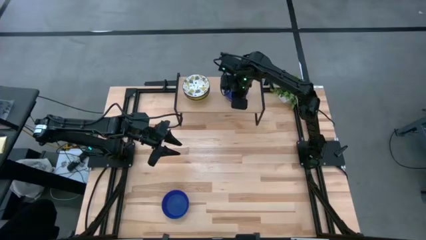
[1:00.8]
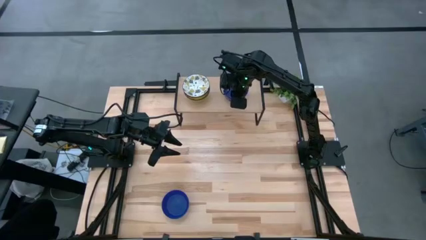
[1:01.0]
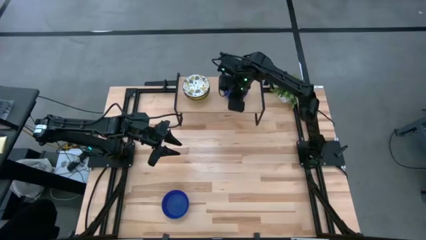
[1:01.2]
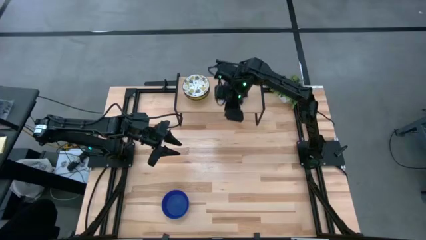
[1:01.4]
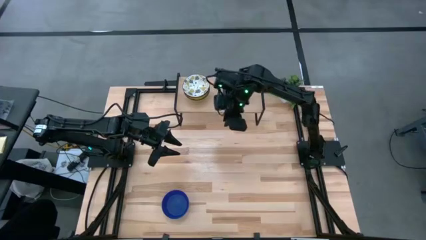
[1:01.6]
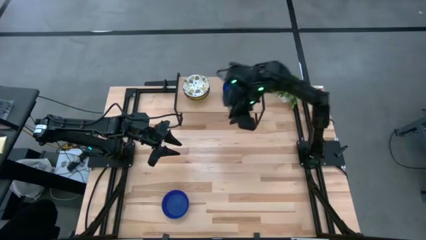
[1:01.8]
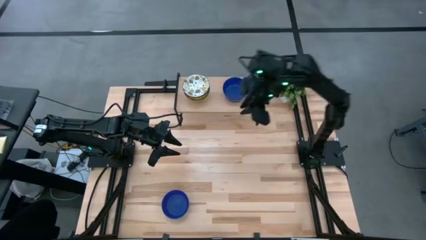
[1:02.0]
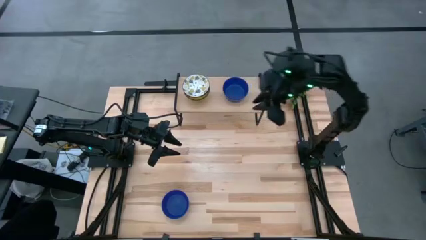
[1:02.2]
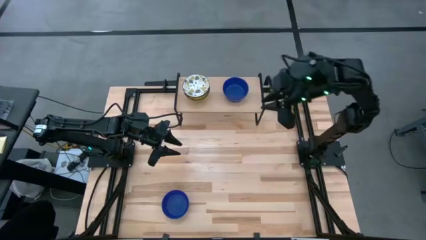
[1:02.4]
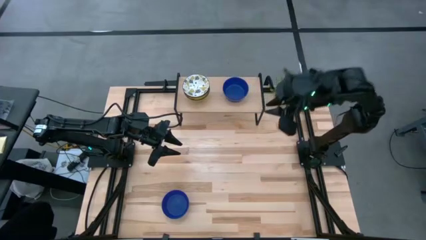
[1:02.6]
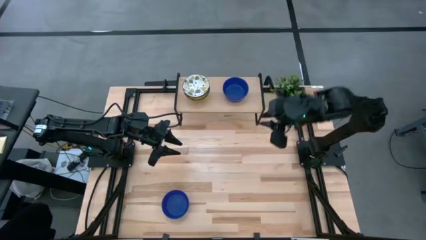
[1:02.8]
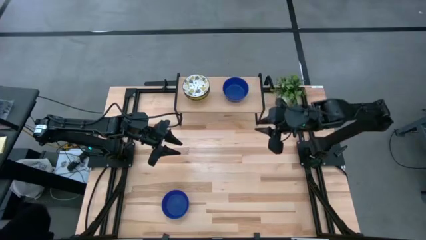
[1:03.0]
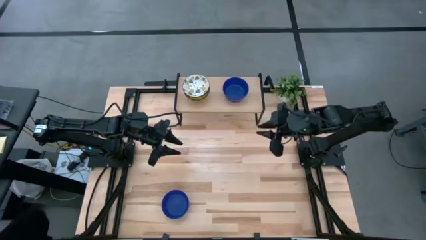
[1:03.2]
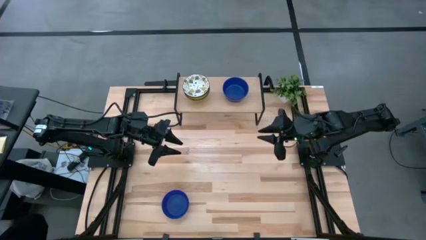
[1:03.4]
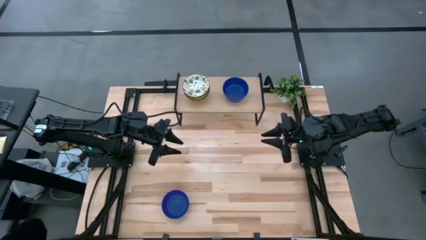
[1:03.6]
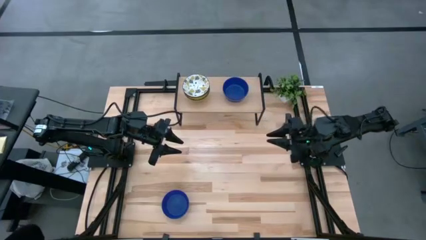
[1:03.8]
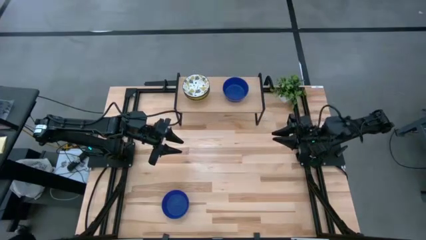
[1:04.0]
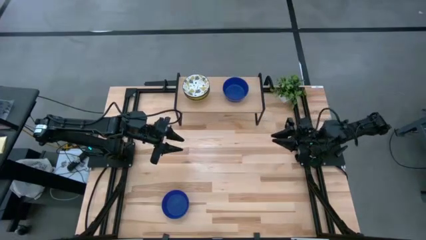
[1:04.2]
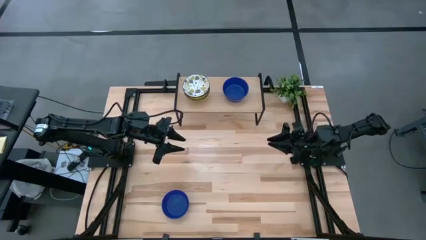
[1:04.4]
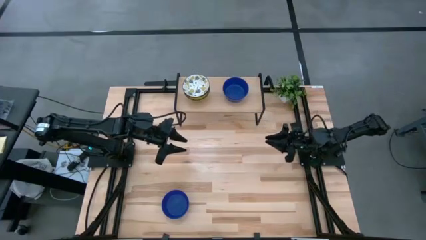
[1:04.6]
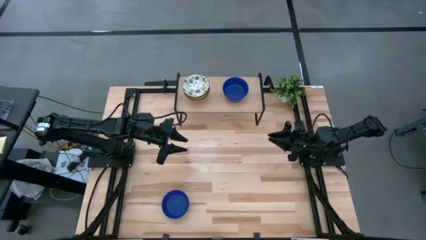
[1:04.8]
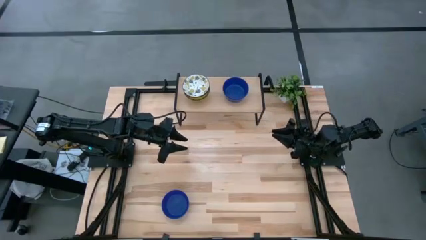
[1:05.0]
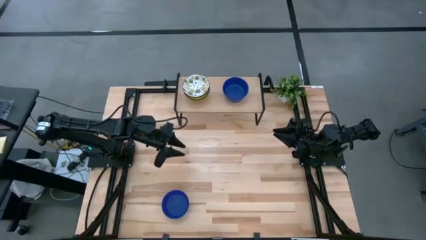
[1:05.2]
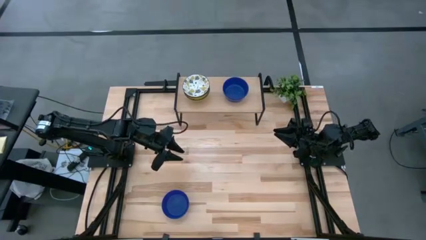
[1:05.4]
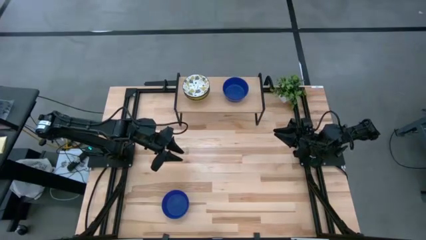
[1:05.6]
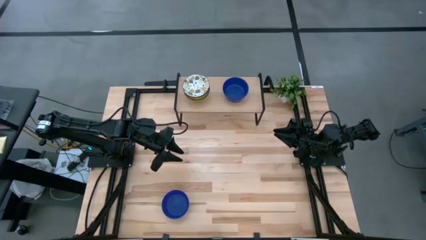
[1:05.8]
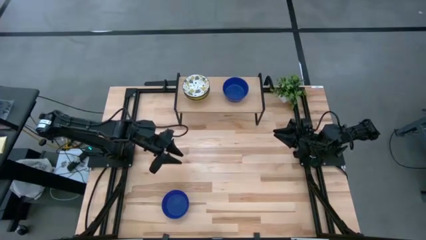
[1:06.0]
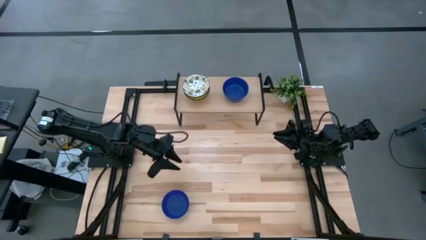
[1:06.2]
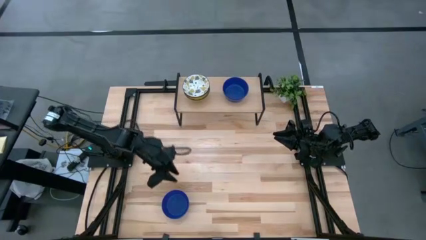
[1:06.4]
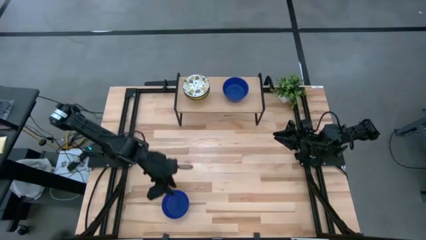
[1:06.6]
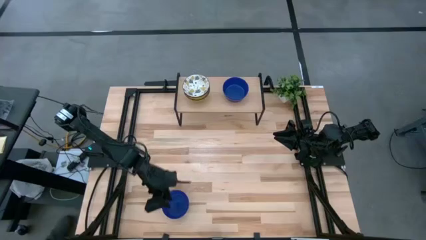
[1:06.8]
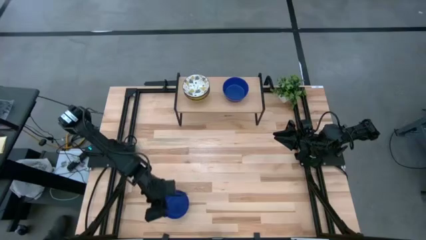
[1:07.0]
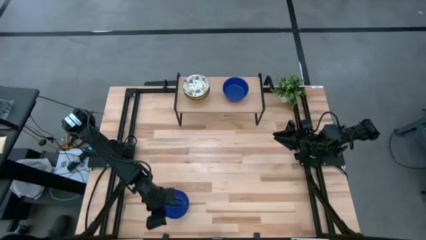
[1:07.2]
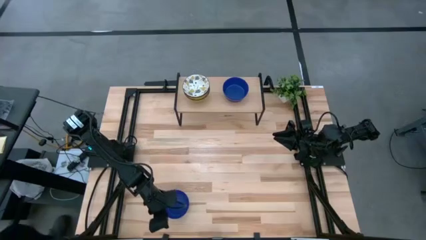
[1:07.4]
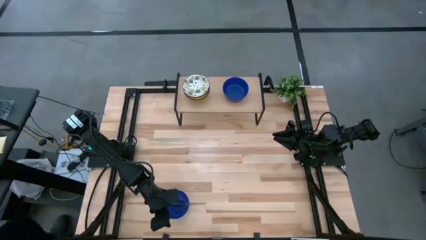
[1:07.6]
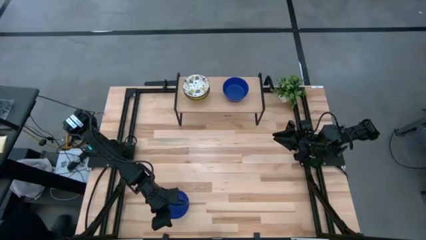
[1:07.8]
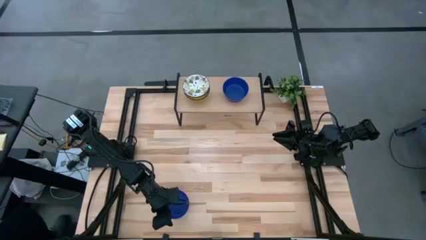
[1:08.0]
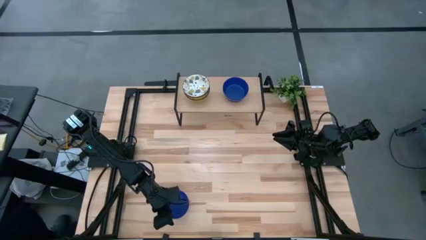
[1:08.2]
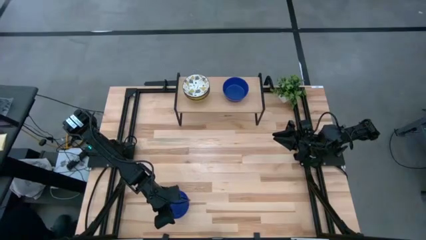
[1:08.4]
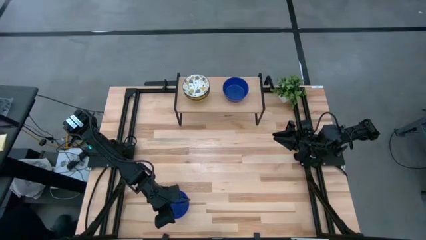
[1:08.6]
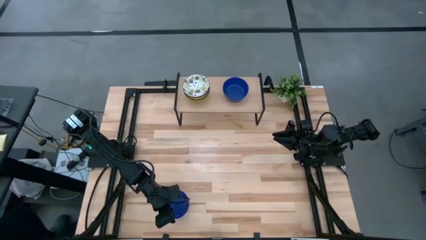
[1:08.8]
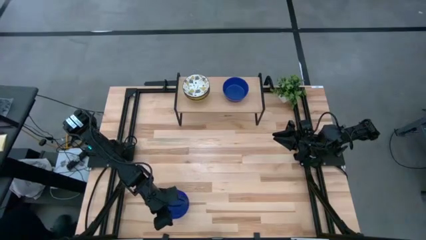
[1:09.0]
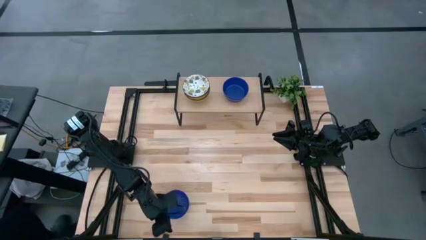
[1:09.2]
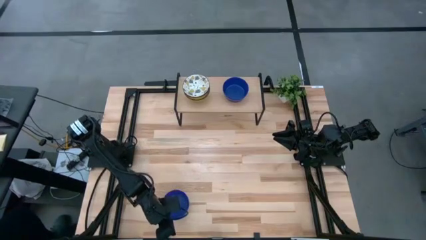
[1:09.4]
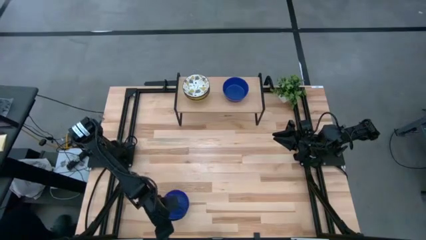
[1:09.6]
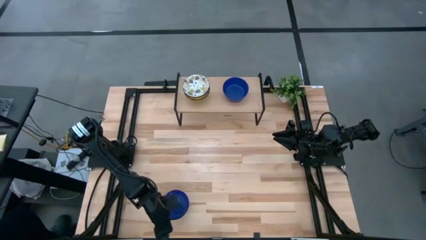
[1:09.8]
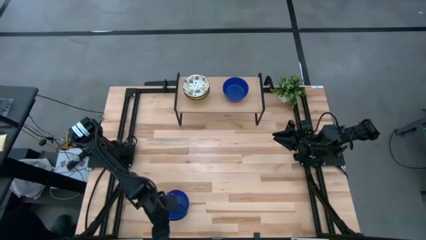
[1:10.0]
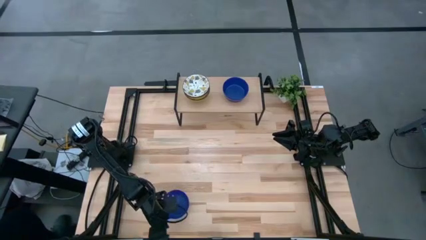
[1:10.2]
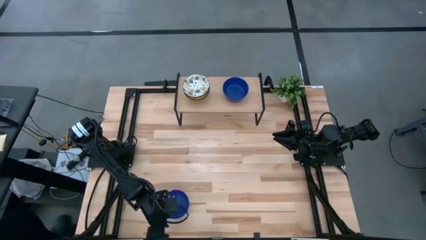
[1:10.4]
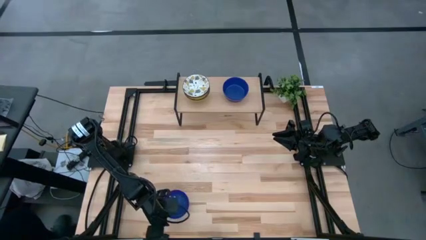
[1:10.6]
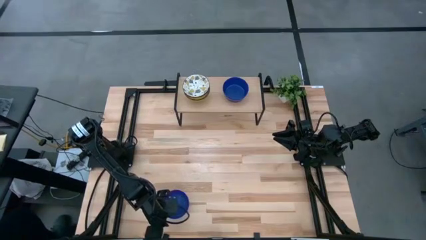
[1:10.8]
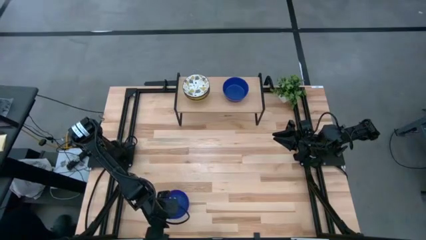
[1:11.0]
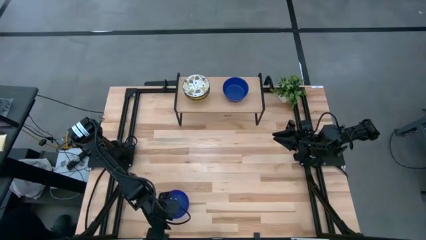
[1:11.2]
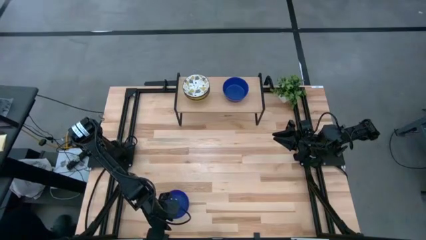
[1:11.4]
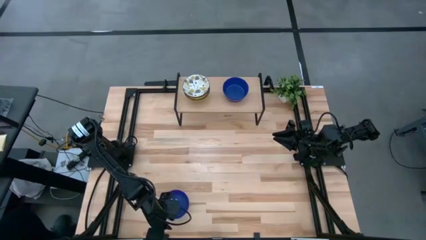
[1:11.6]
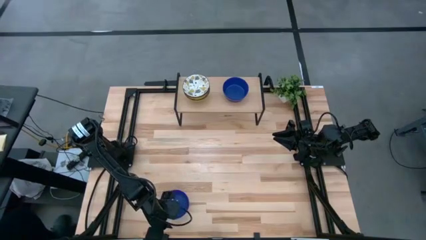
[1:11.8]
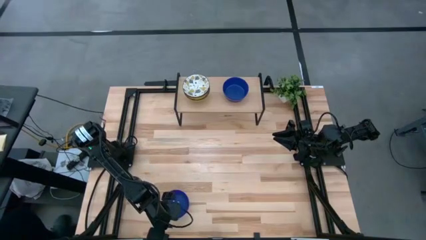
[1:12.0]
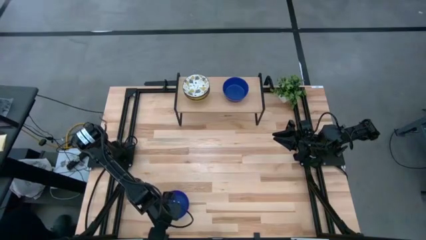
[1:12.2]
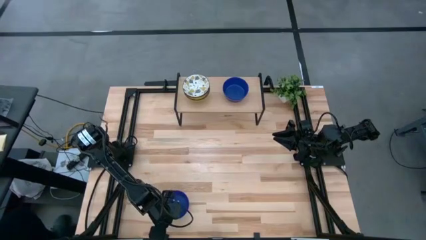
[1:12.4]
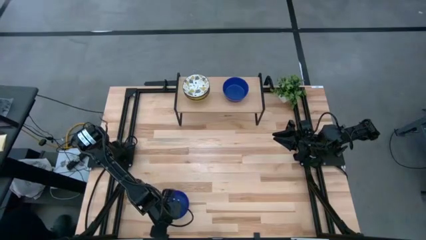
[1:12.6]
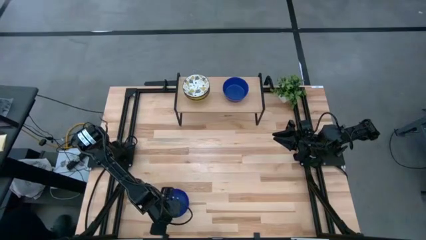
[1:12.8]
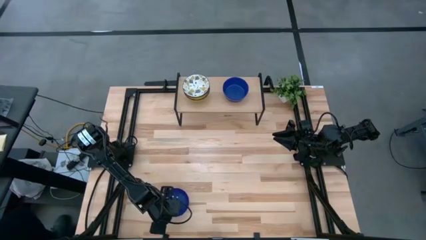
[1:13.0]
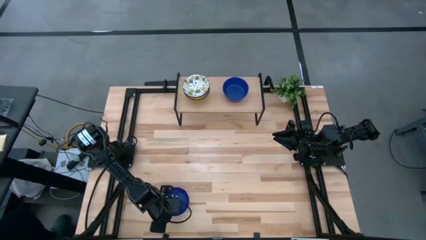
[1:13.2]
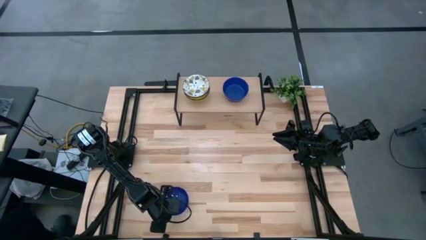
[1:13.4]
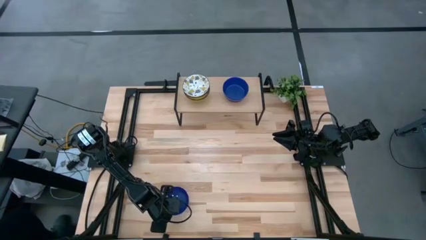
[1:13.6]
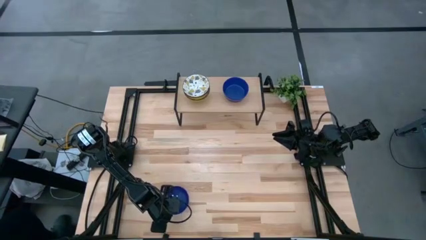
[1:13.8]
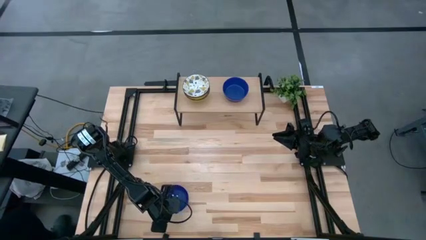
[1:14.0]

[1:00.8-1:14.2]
Task: Pick & Place Mini bowls
Stack the blue bowl on top of the blue bowls on the shelf

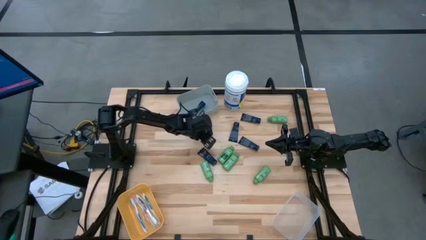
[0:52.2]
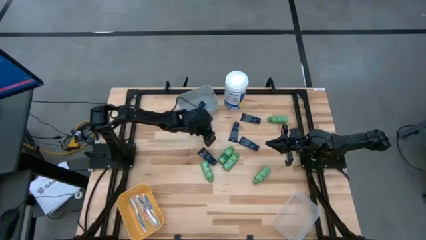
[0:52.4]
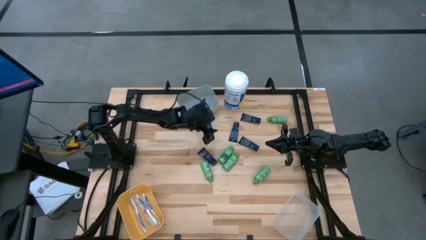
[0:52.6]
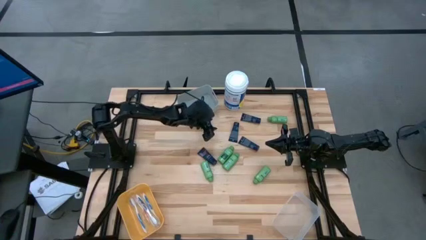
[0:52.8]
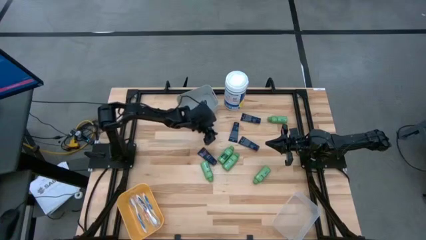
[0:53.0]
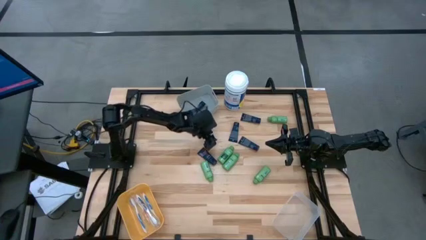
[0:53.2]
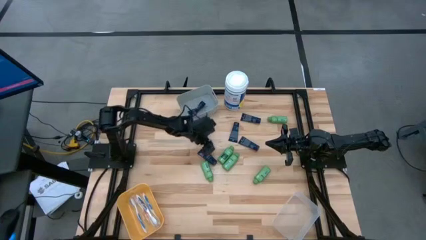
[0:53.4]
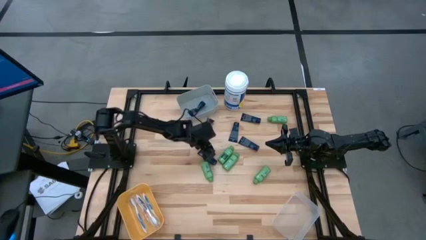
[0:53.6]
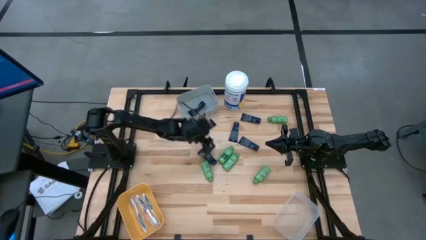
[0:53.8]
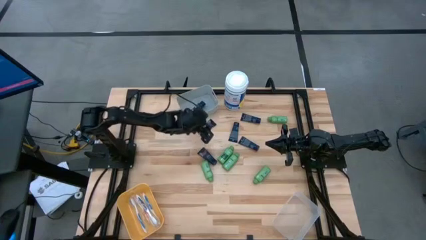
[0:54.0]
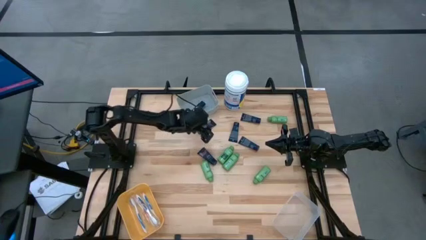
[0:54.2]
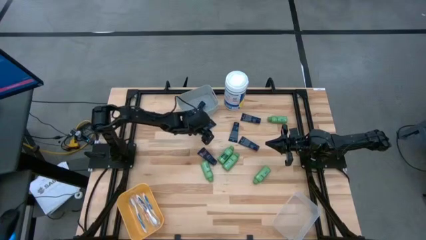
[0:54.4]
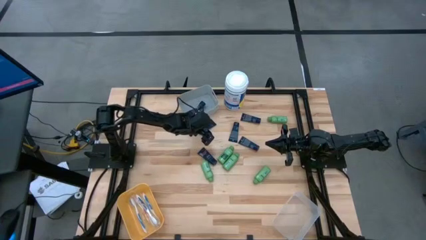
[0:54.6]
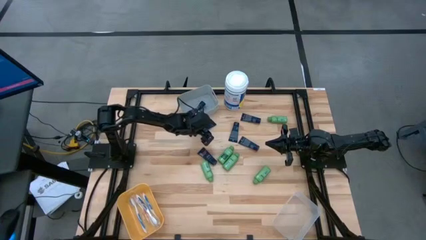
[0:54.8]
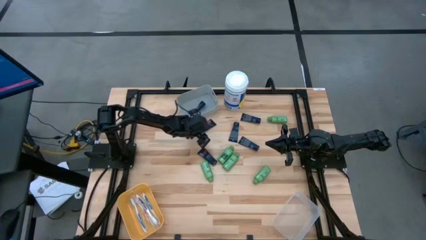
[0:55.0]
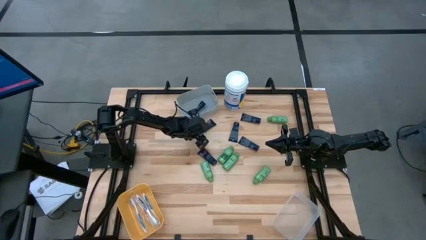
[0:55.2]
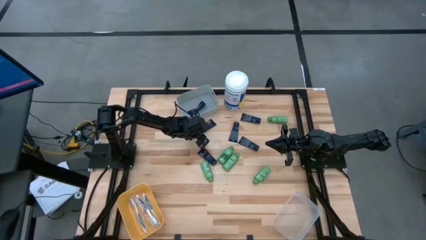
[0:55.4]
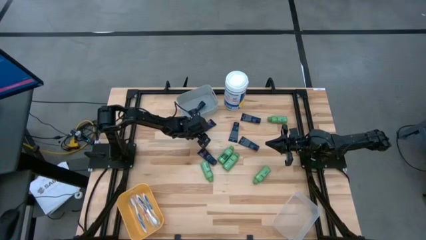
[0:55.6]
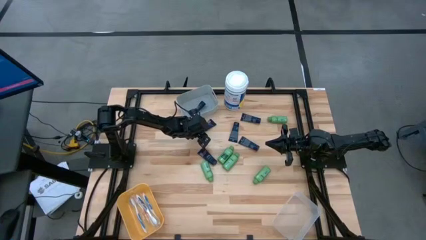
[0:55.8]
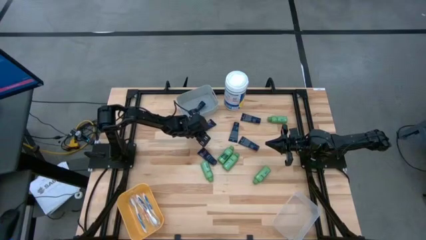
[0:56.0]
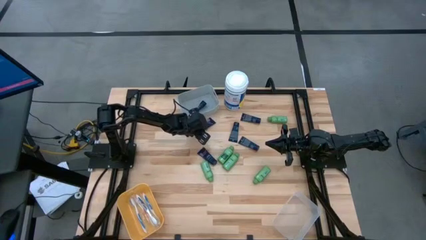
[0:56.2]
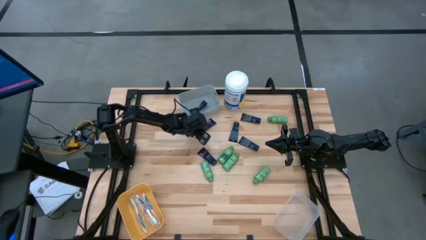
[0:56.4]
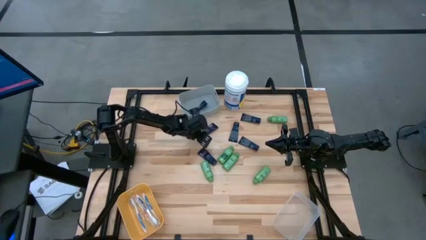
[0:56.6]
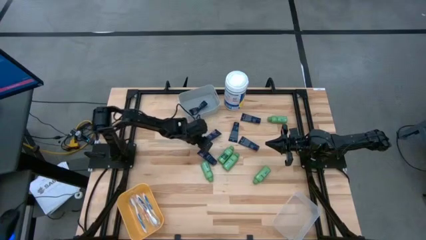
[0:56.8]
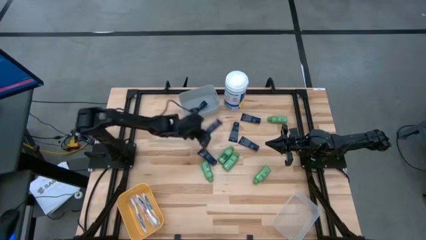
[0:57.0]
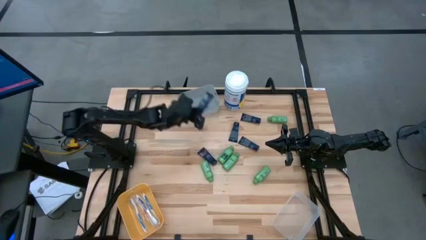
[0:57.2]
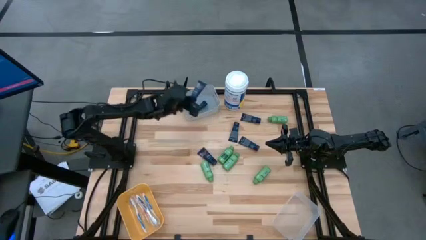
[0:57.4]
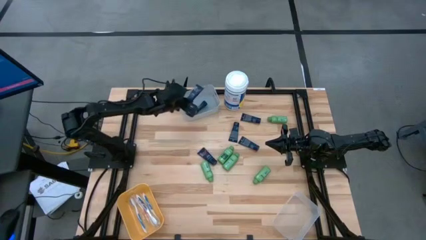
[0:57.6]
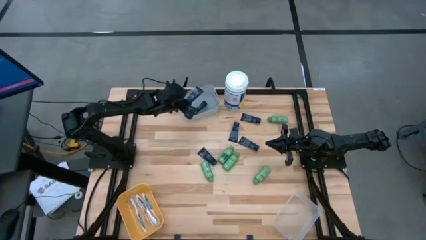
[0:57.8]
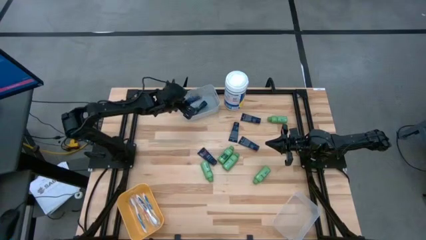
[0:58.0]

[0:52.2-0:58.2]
Task: Pick & Place Travel size toiletries
Put the dark blue shave cream into the gray bin
